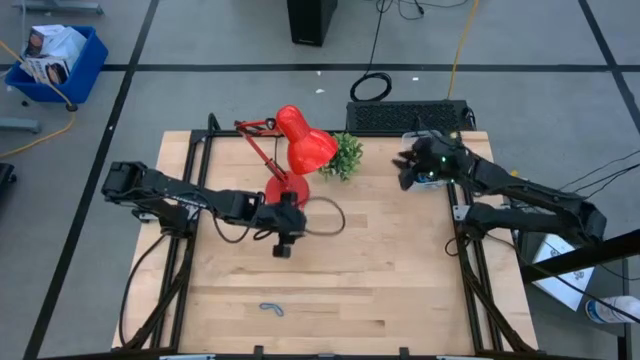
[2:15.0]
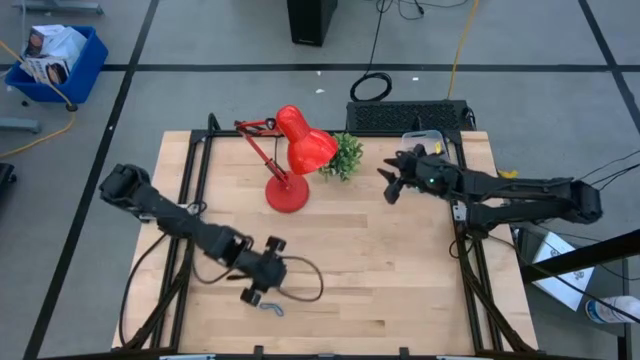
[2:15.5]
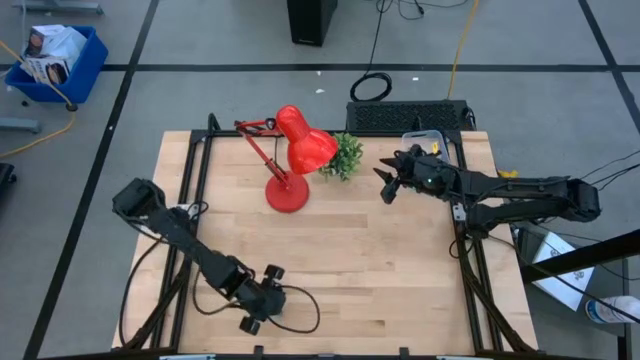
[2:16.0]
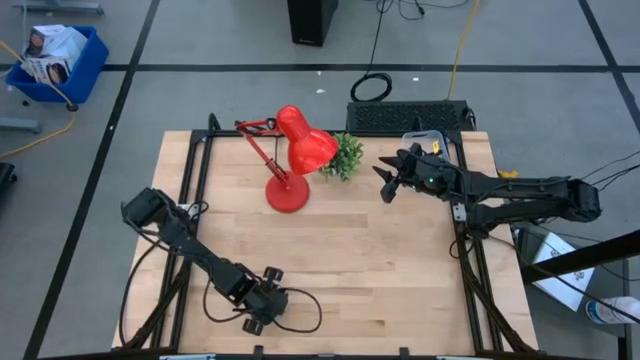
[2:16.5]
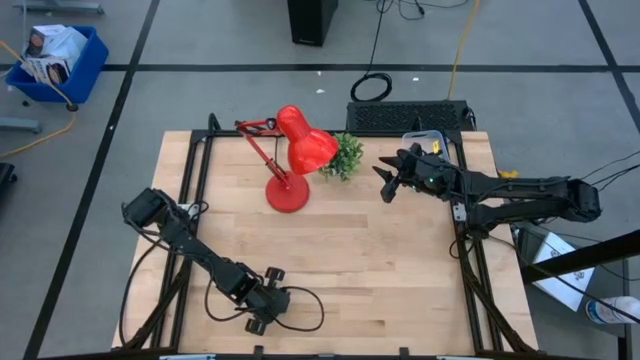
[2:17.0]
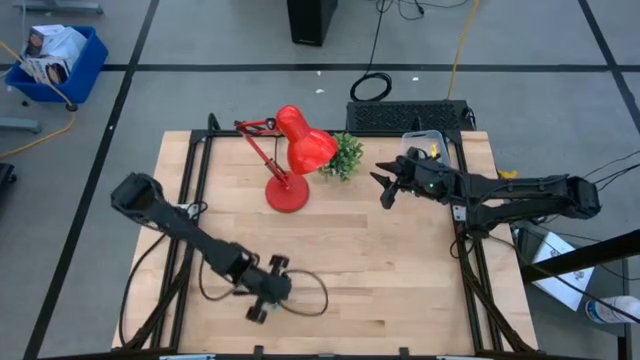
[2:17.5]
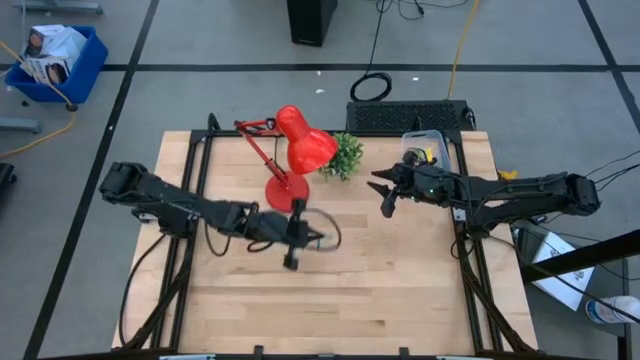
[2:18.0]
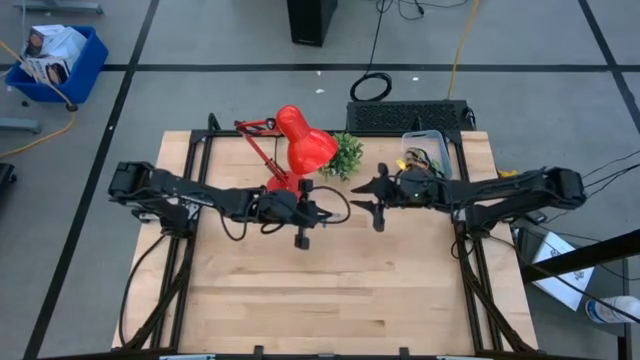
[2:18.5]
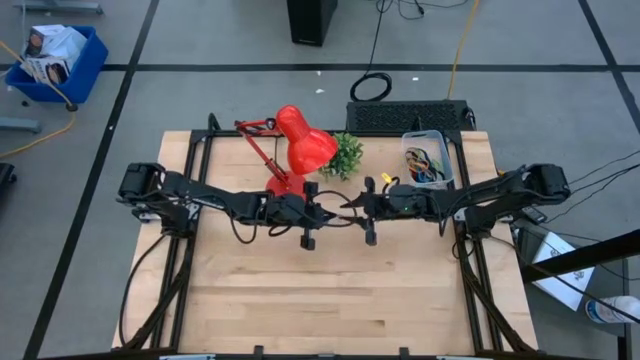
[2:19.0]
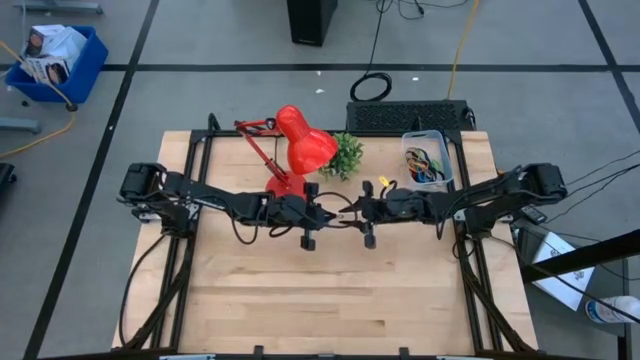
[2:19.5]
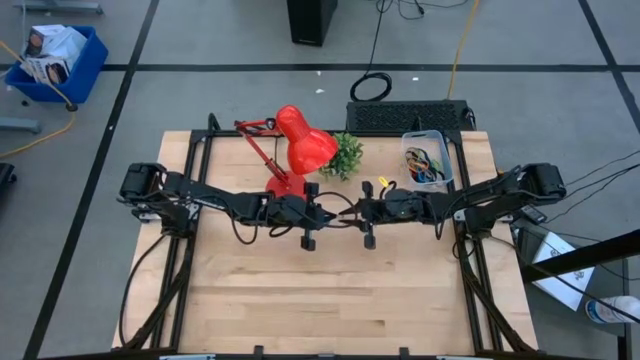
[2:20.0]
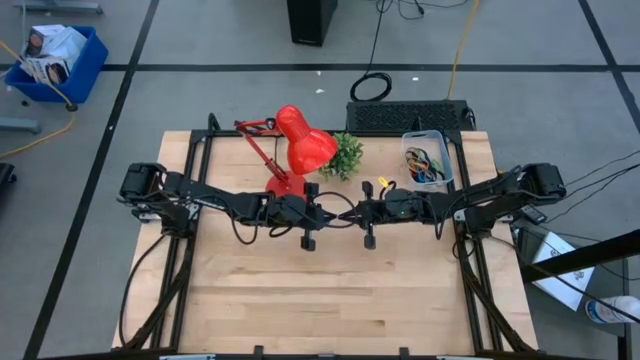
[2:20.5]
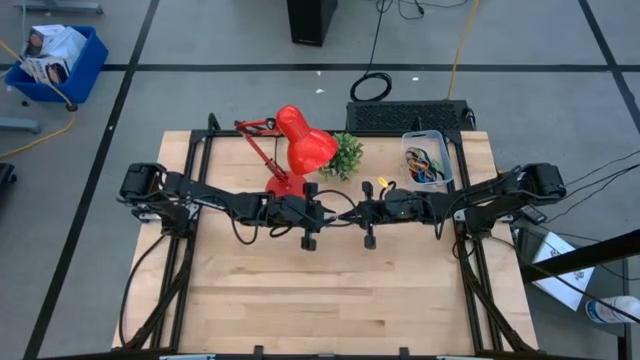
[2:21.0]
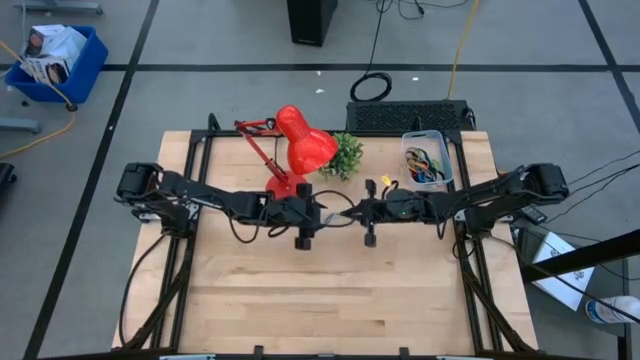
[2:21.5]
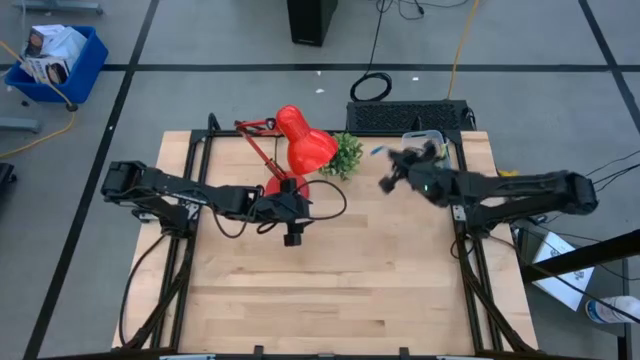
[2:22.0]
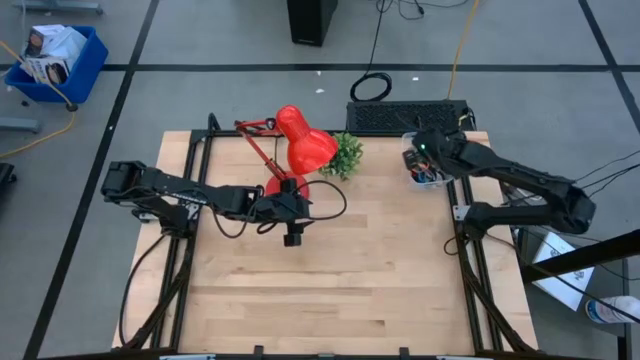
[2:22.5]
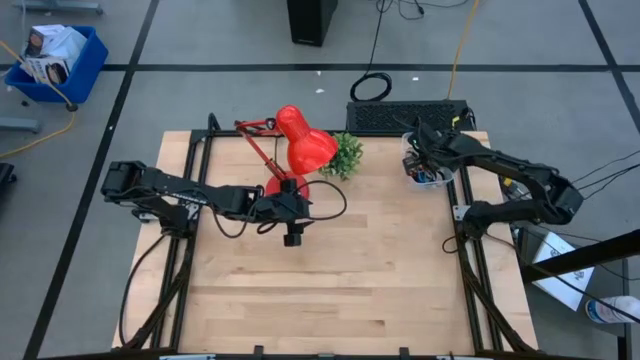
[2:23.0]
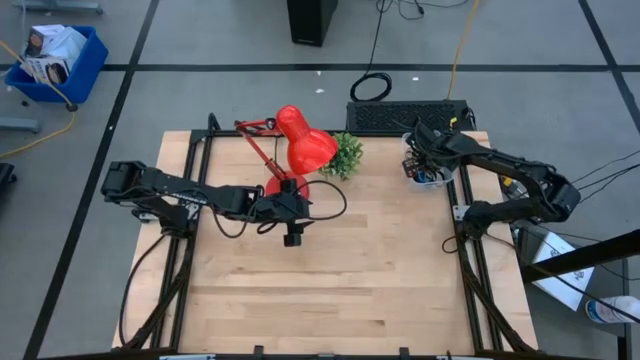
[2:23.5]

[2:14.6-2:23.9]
Task: Pick and place rubber bands into bin
Put the blue rubber band into the transparent bin

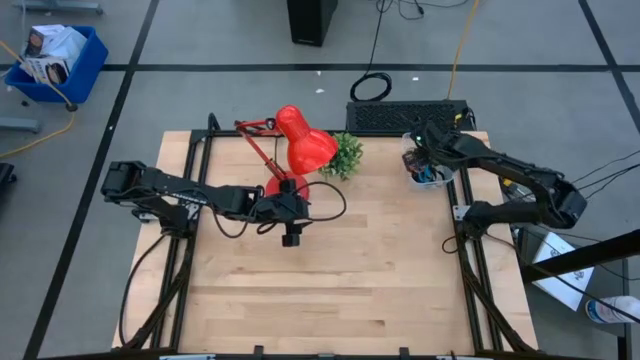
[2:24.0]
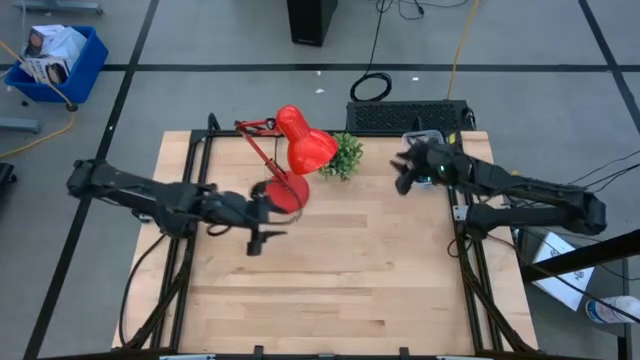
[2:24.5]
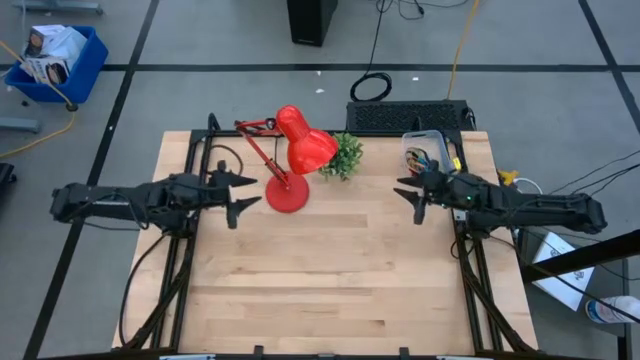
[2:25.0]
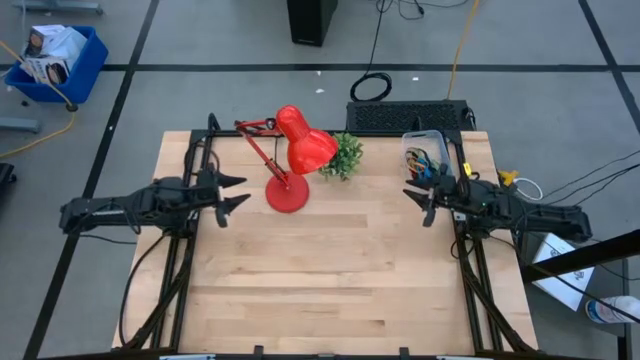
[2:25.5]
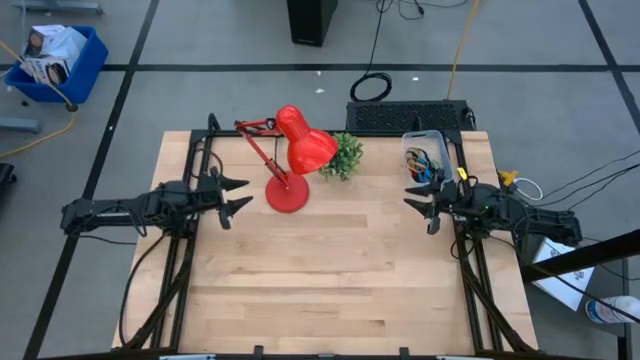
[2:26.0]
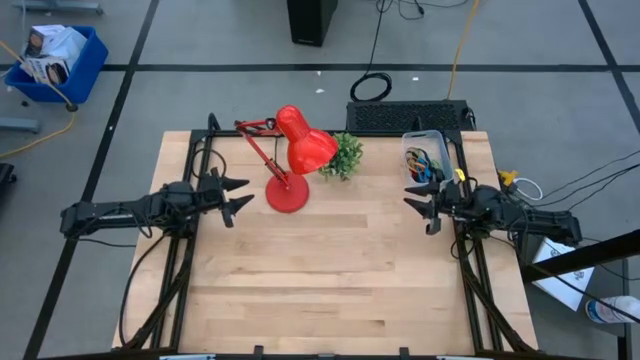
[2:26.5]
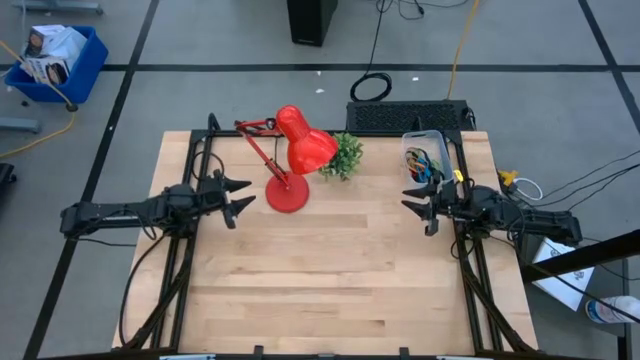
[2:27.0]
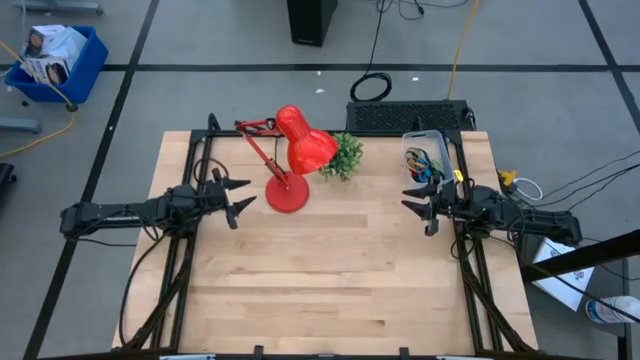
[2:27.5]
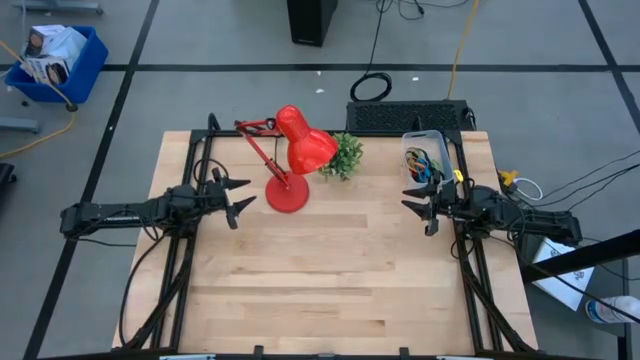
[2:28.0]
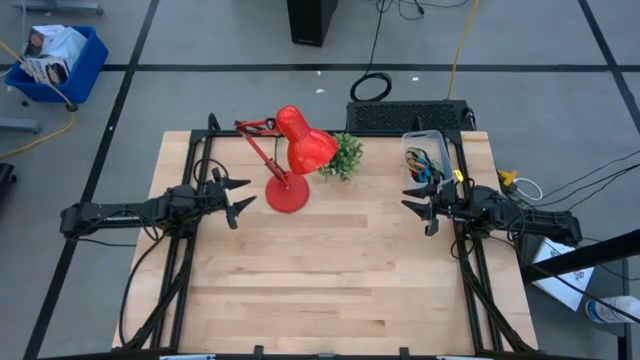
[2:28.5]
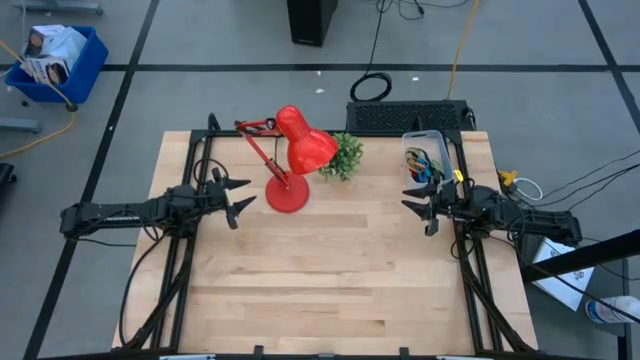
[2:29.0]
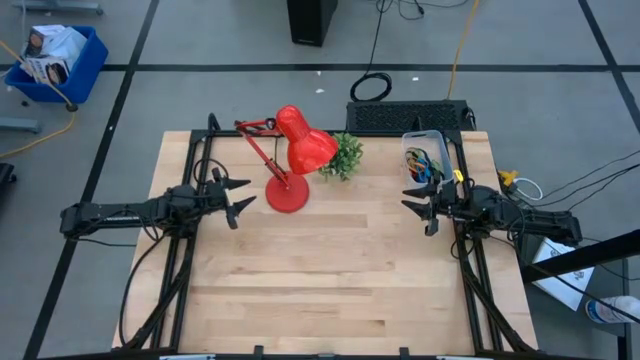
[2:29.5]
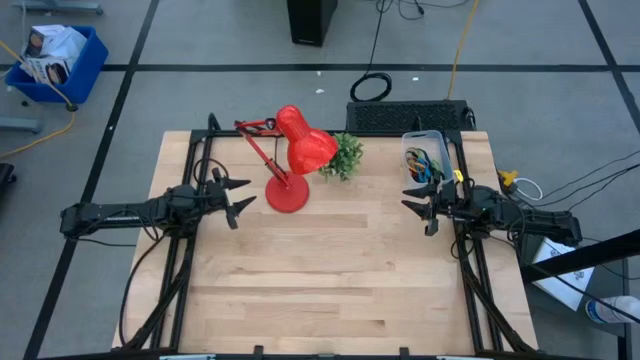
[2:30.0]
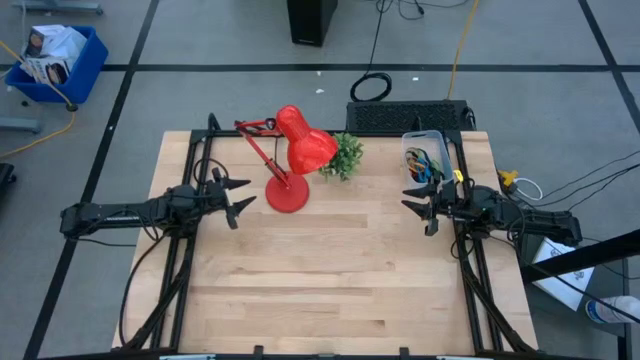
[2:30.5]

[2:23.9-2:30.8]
Return to Home Position

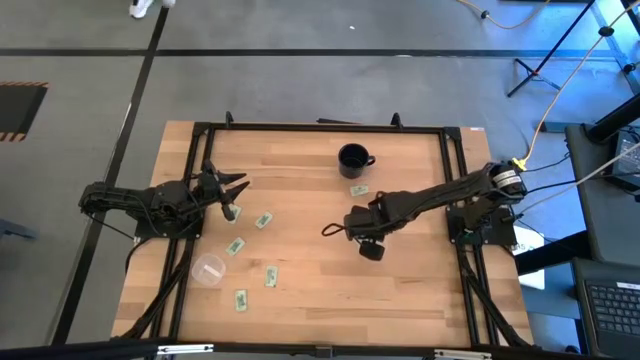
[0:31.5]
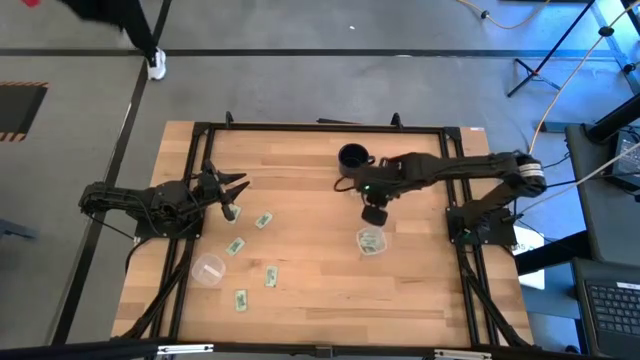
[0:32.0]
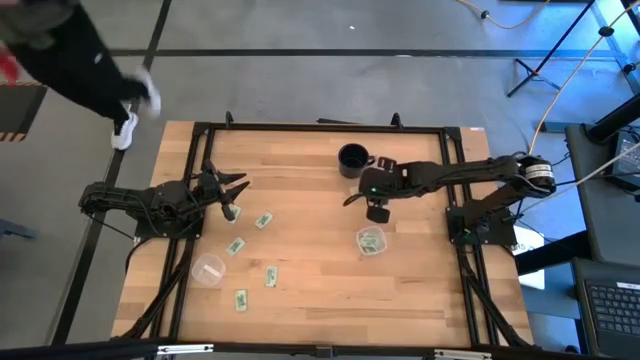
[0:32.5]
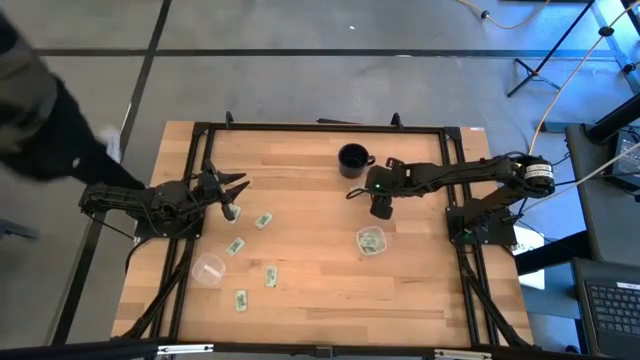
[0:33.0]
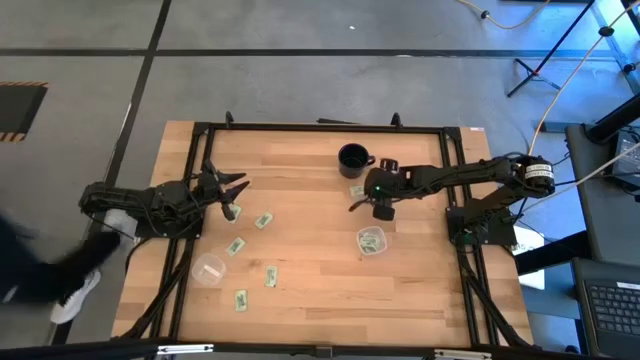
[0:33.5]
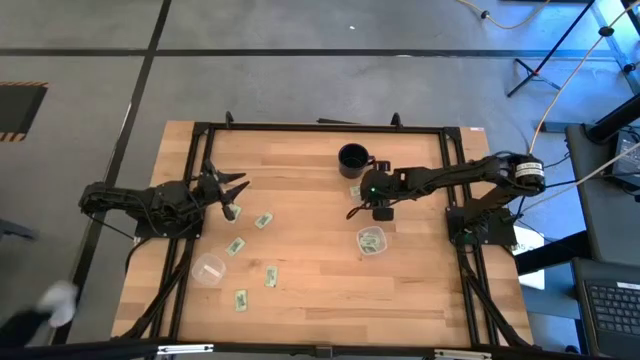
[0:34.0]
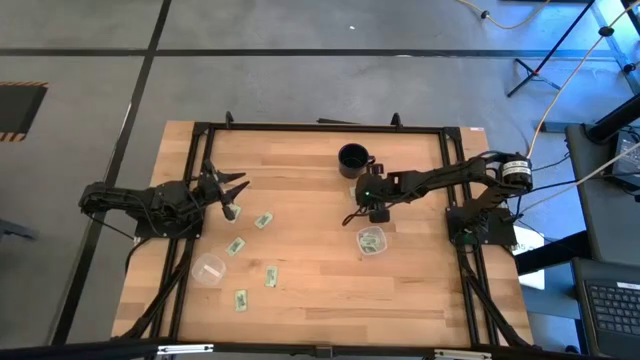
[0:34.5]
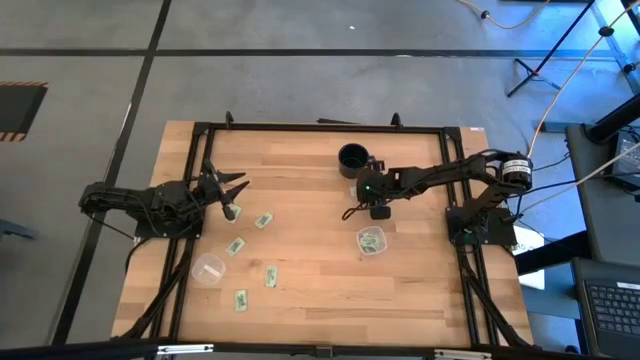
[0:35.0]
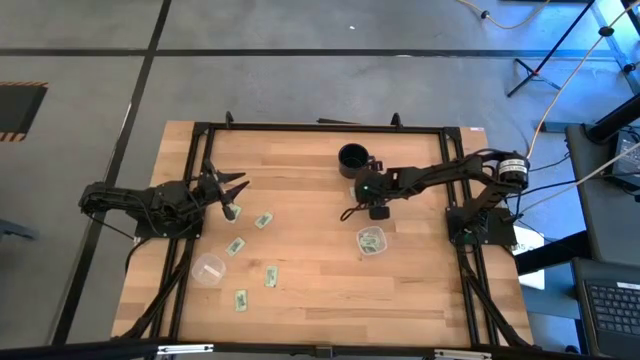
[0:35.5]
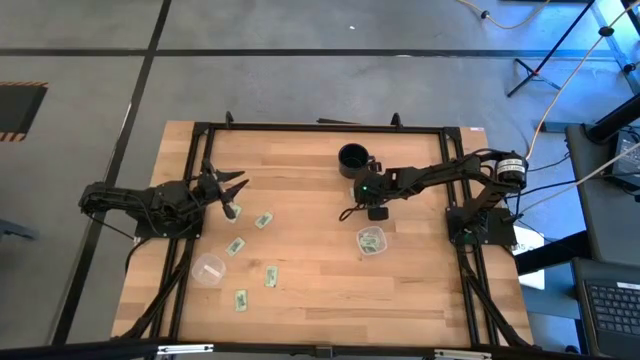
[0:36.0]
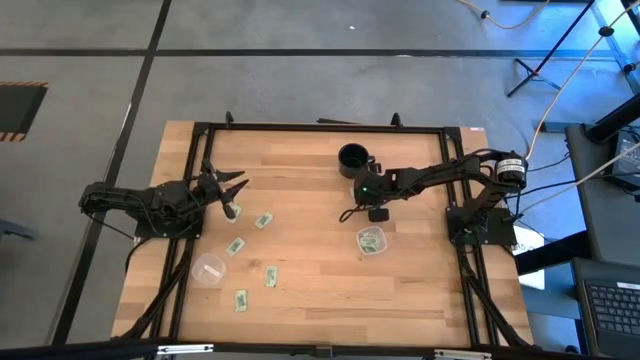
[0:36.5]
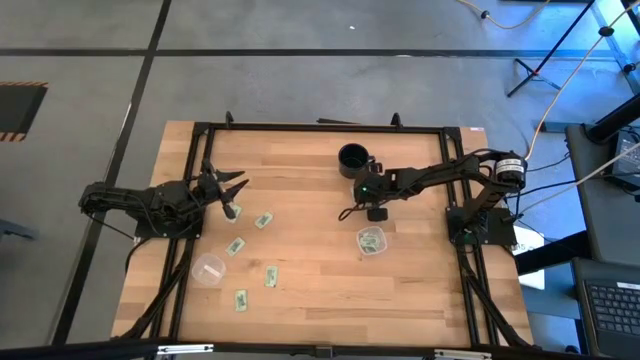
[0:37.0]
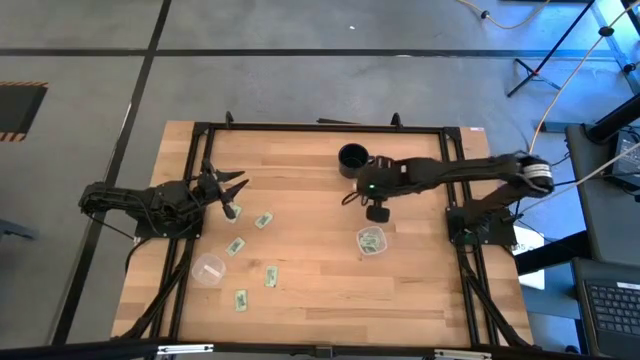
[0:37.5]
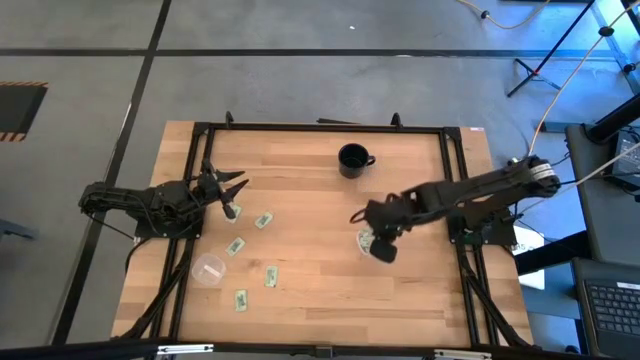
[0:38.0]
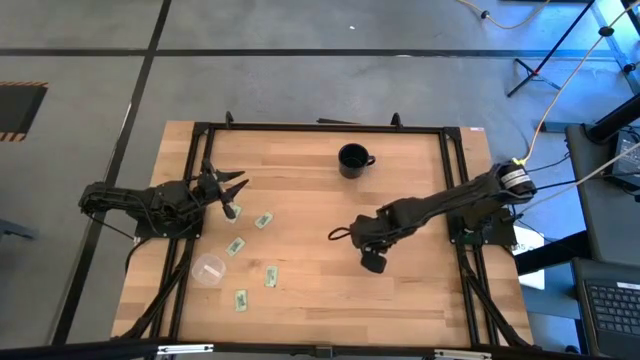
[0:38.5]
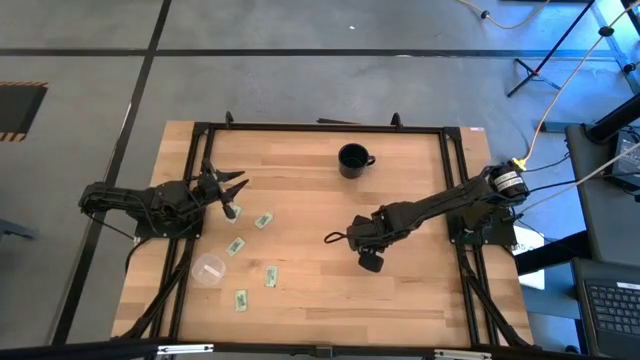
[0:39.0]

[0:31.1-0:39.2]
Task: Pick and place Stevia / Truvia into bins
Put the stevia packet into the right transparent container
